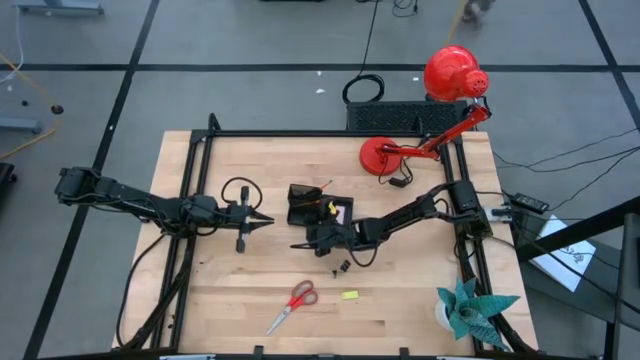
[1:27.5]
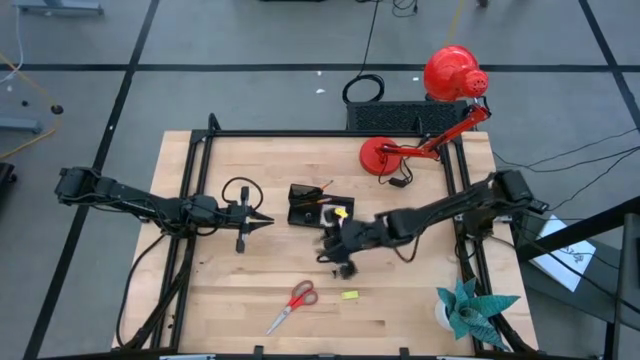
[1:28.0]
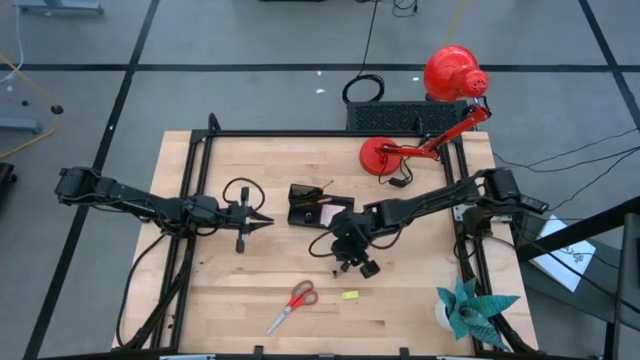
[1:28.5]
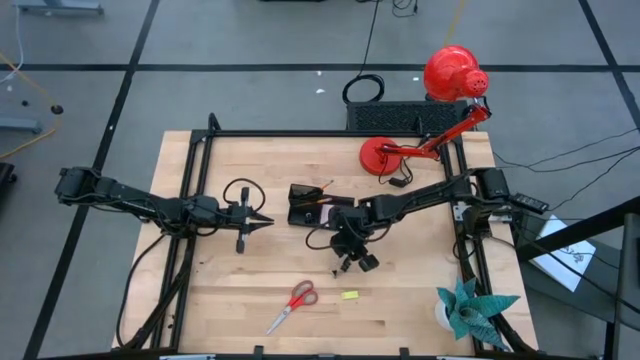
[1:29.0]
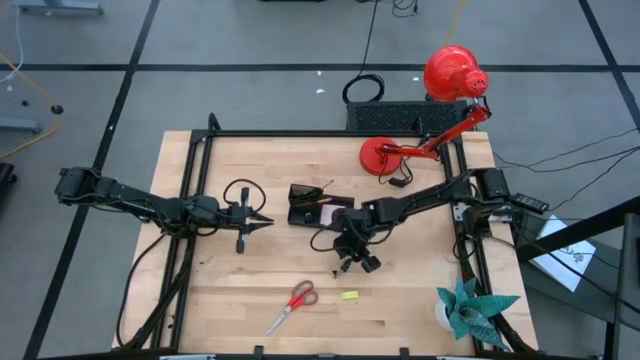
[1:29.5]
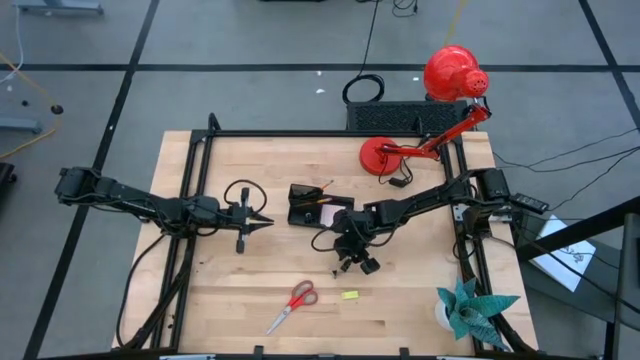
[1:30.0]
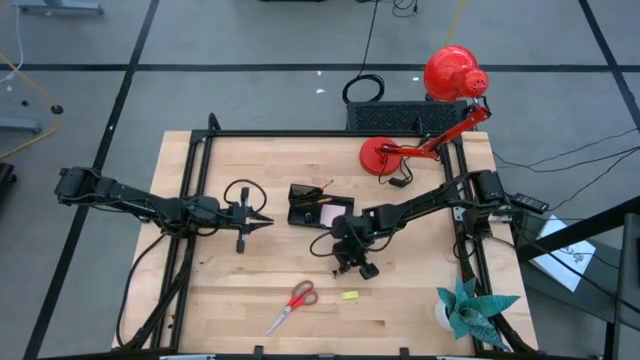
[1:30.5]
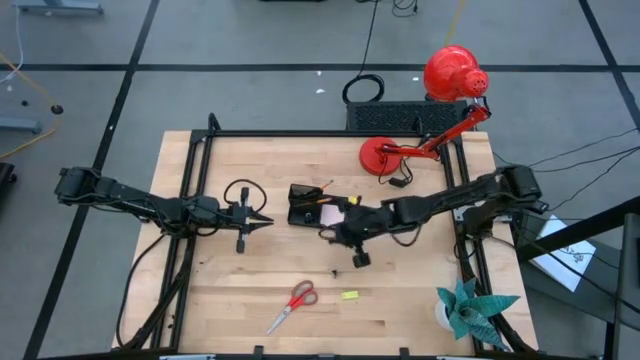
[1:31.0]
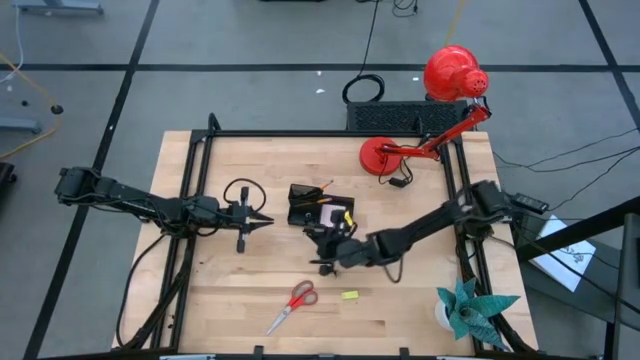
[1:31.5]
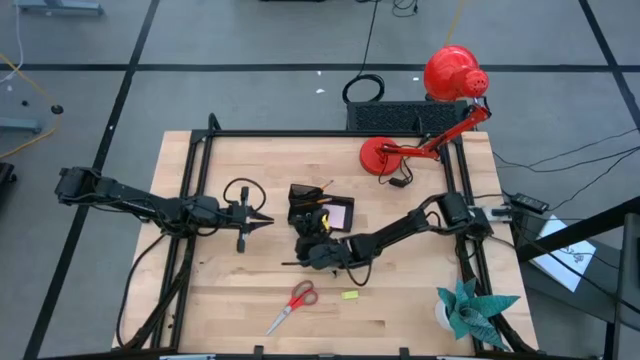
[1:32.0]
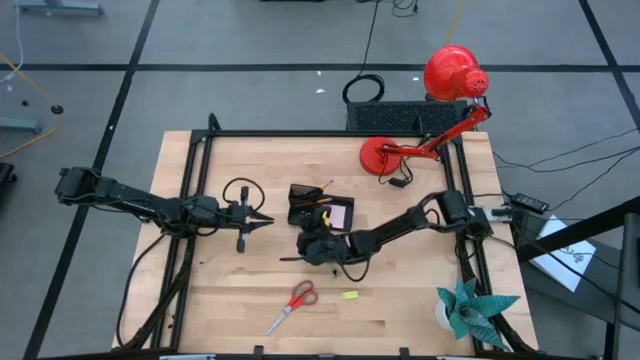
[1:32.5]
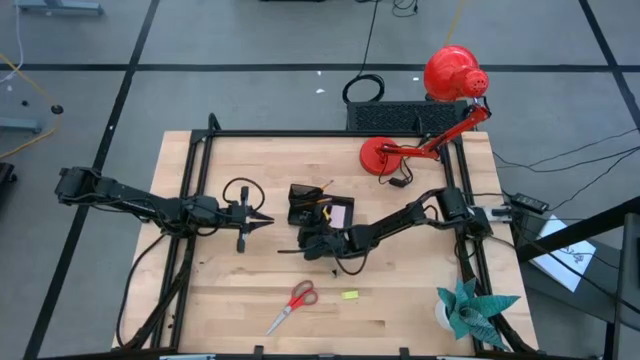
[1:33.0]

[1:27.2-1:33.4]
Task: Pick and place office supplies into organizer
Put the black binder clip into the black desk organizer

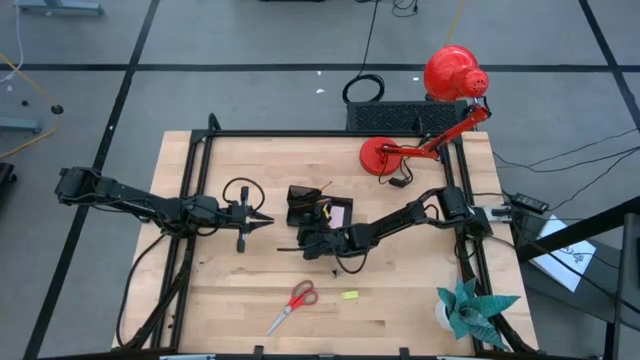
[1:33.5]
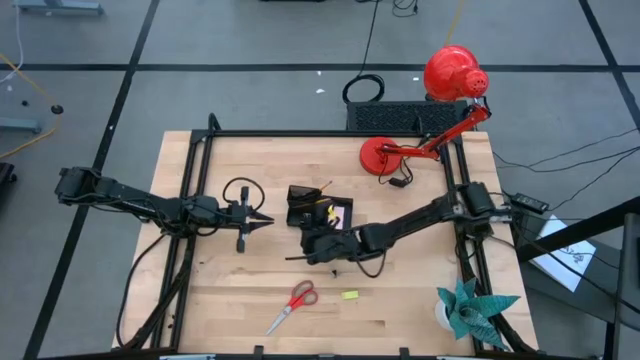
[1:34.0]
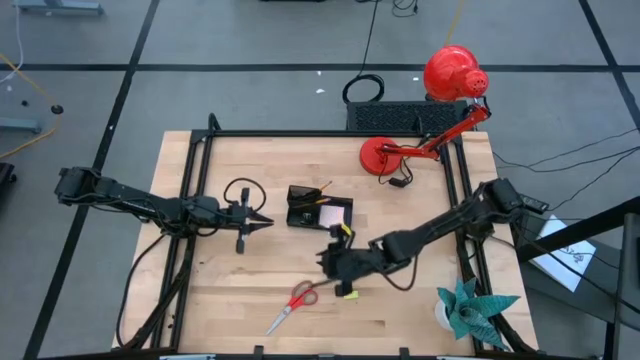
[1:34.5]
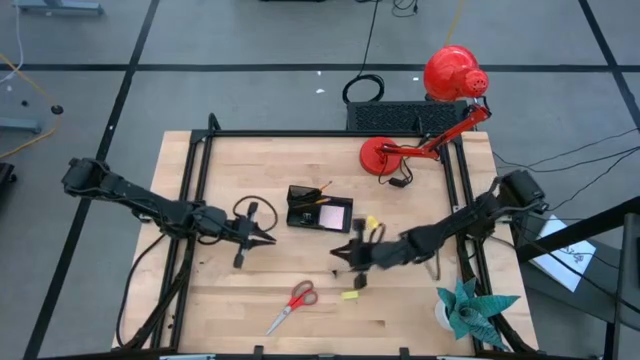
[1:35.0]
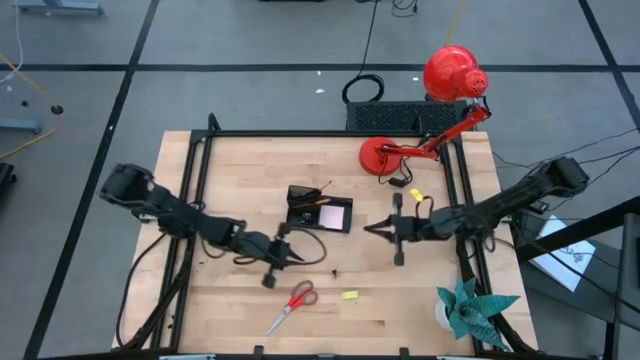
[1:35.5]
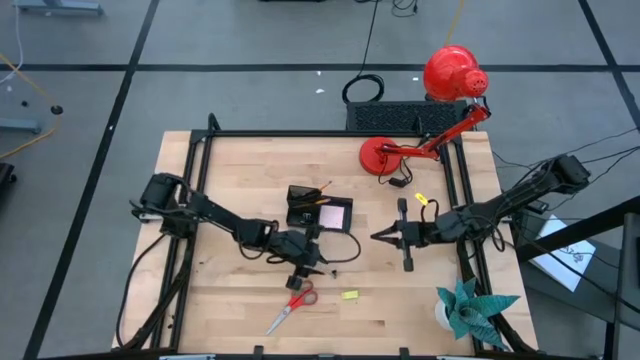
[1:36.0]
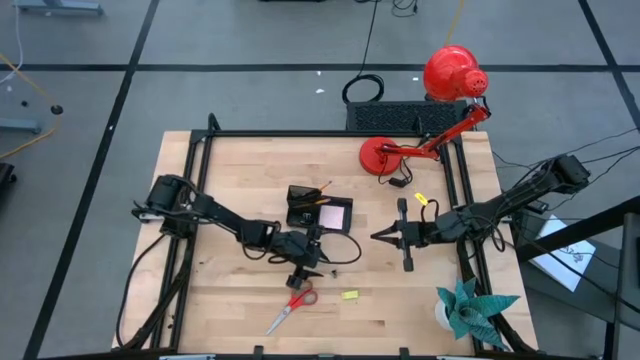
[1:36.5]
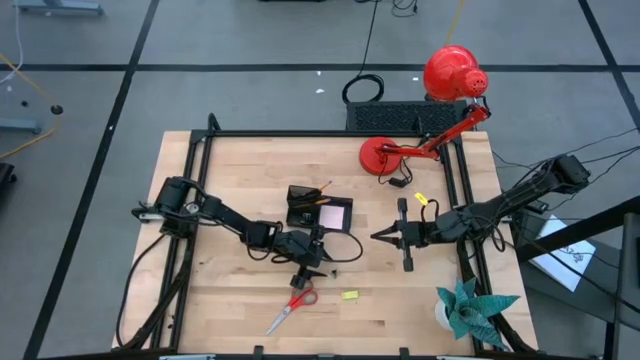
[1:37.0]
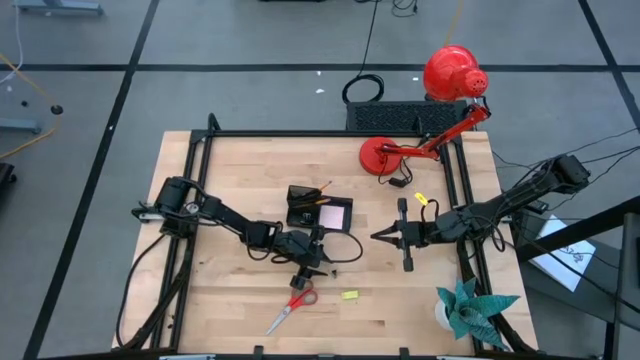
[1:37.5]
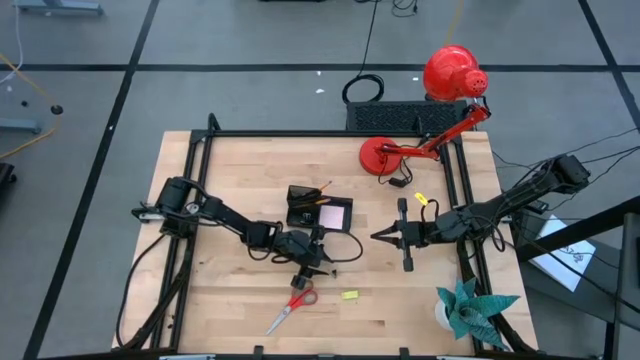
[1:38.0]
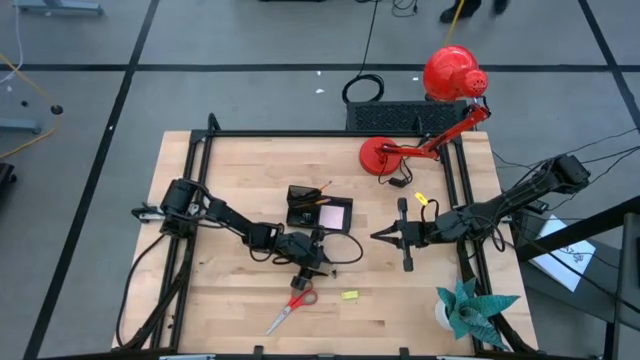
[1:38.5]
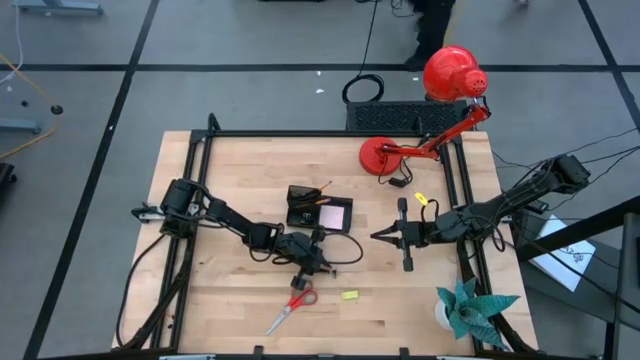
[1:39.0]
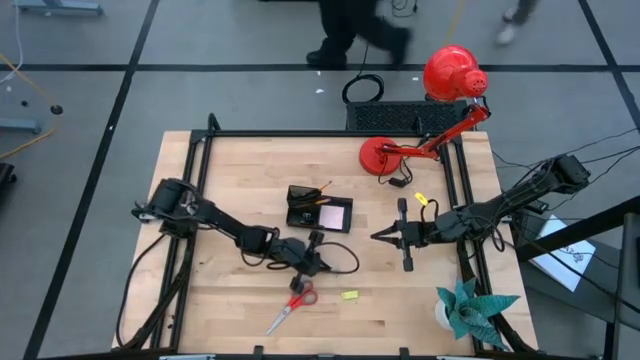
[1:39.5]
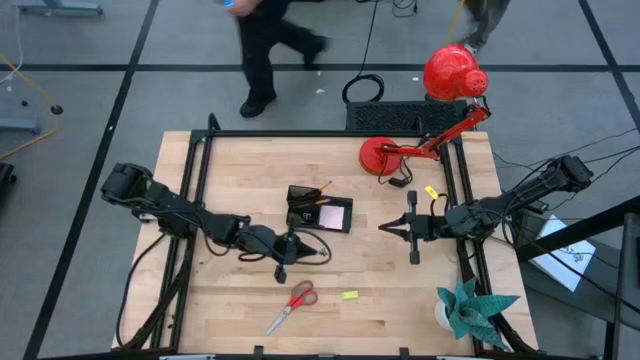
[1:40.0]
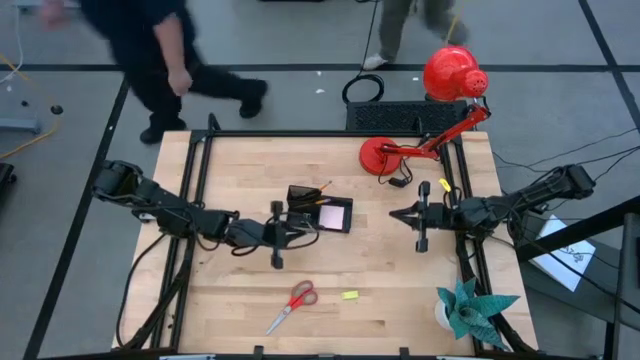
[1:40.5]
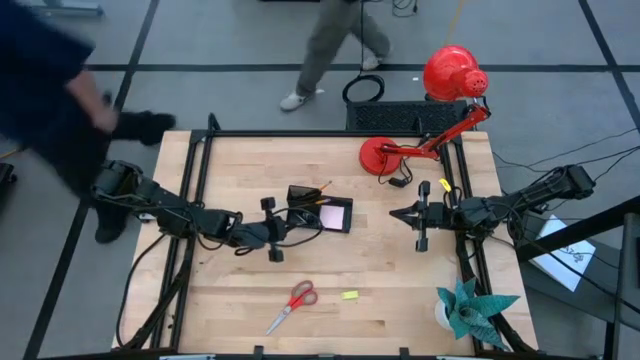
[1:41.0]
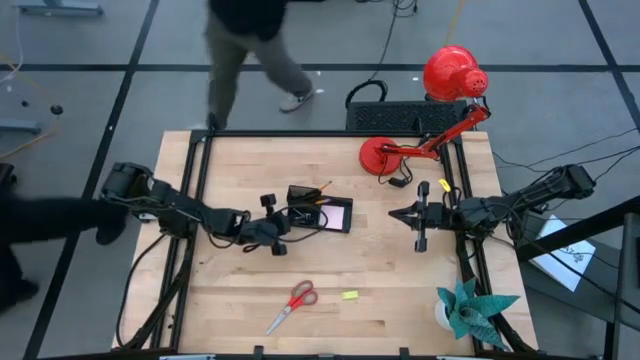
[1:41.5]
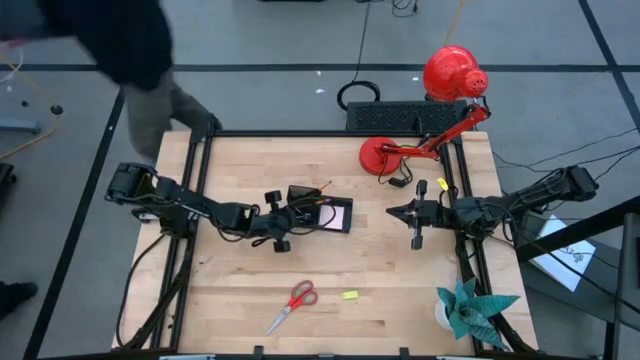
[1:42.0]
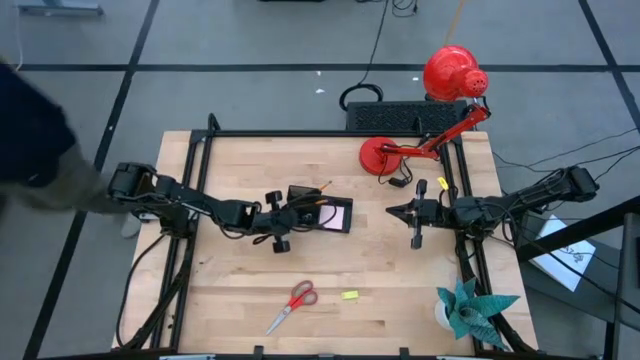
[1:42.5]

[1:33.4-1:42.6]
Put the black binder clip into the black desk organizer

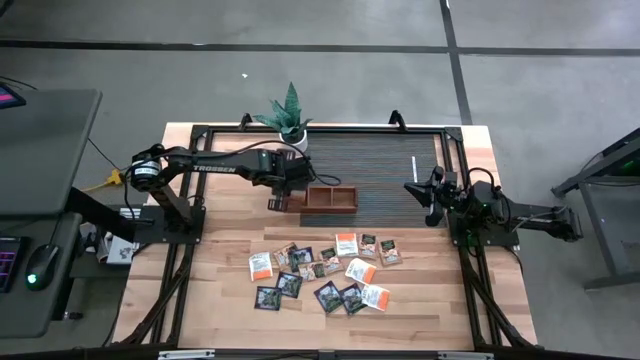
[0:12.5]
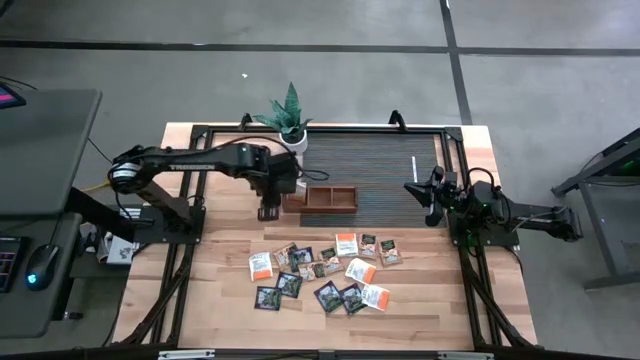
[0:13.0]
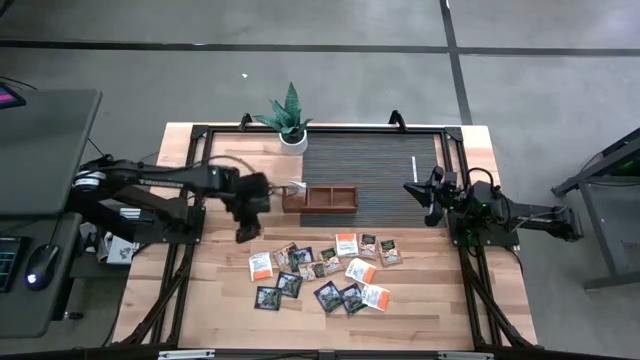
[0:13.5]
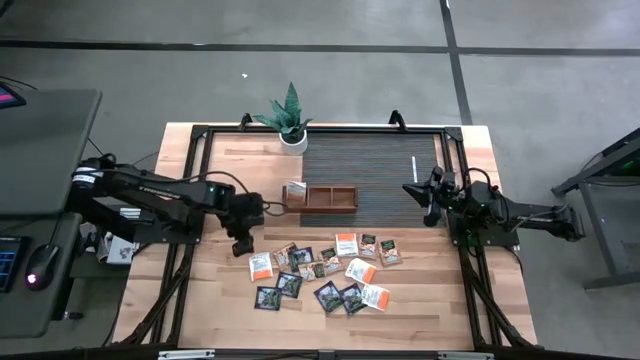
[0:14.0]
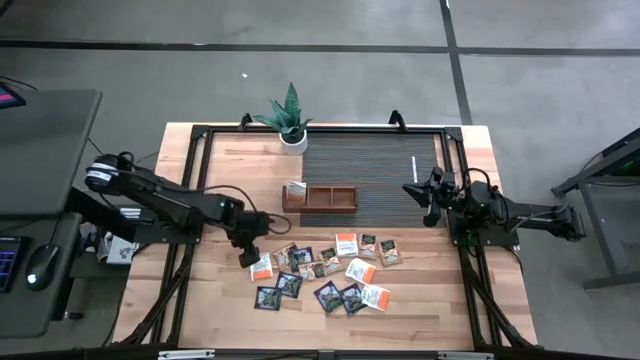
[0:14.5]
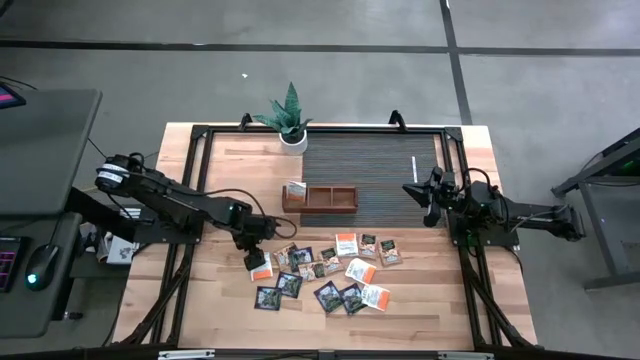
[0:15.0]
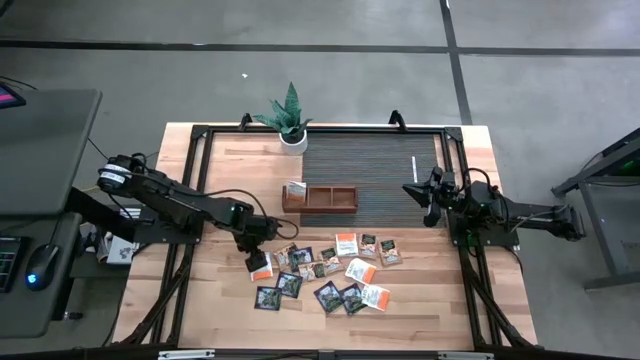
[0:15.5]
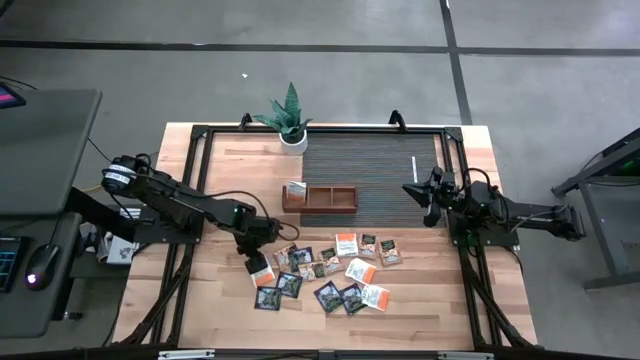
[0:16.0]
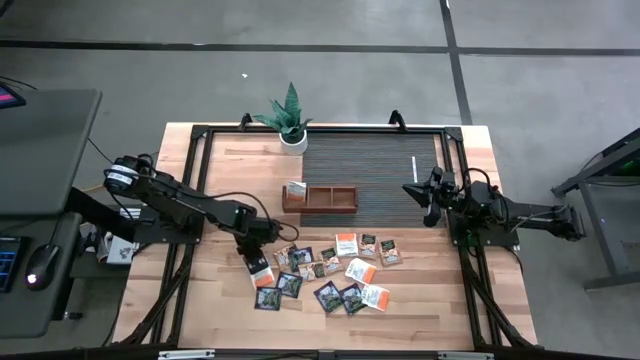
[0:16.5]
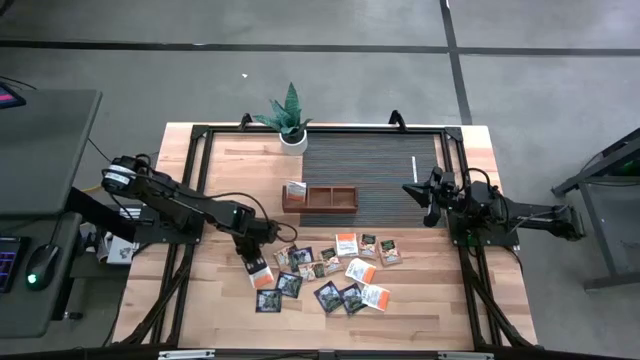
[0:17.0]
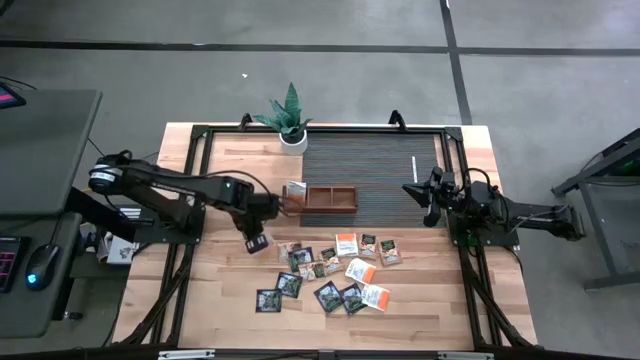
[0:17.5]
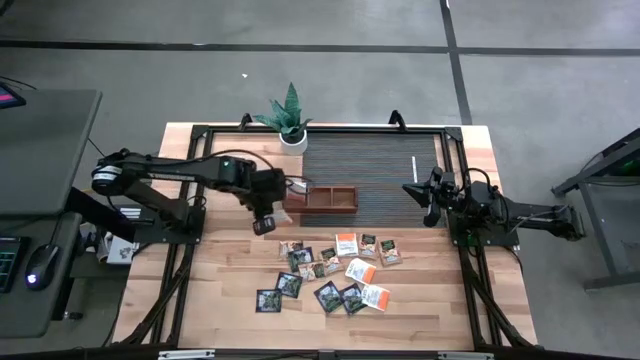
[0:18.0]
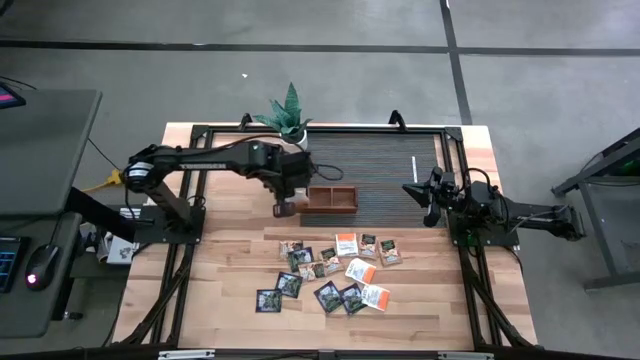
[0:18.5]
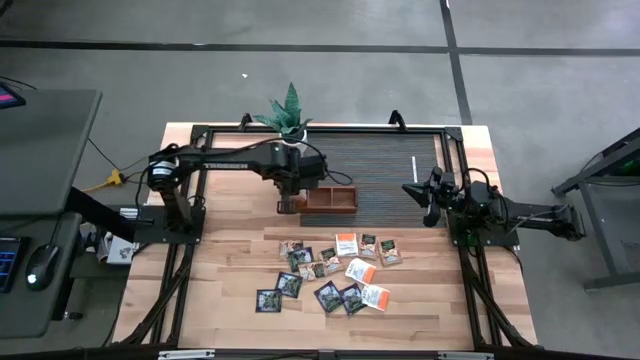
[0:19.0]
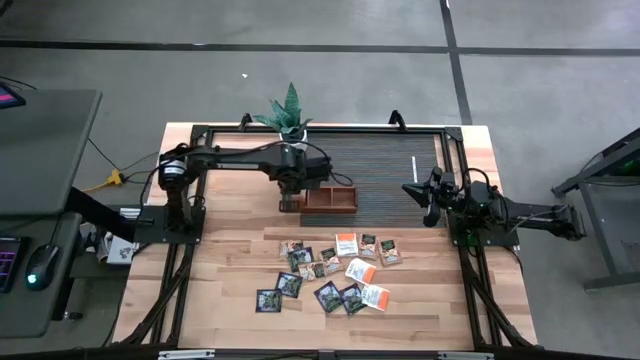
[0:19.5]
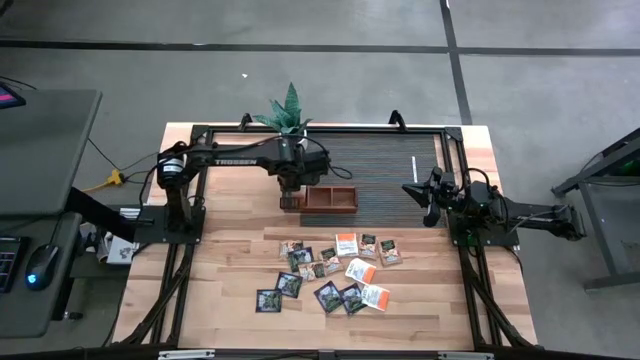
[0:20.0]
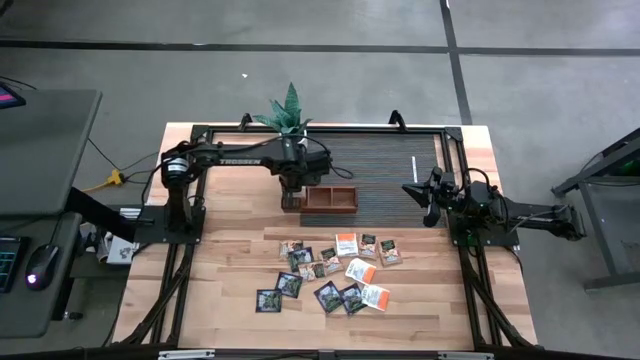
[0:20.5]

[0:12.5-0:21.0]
Task: Pick & Place Tea
Put the orange tea bag into the left section of the wooden organizer
